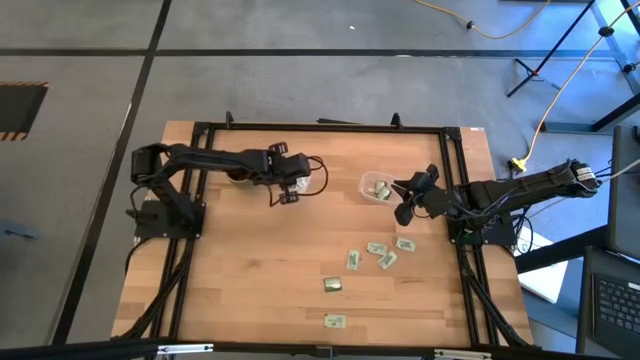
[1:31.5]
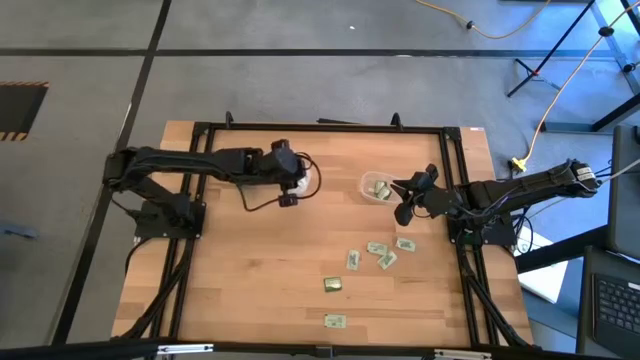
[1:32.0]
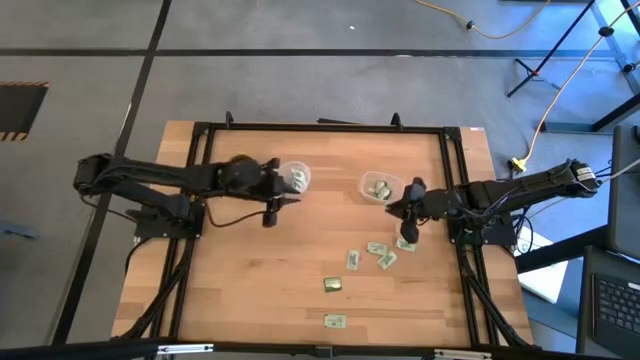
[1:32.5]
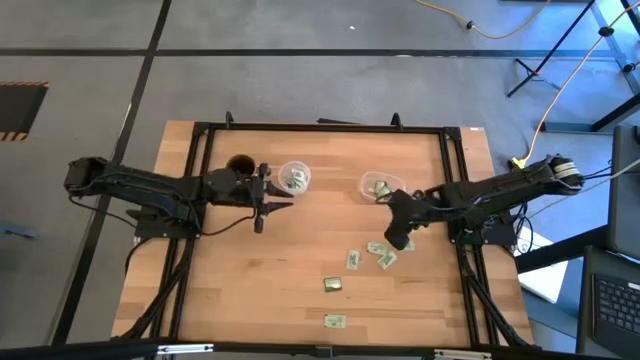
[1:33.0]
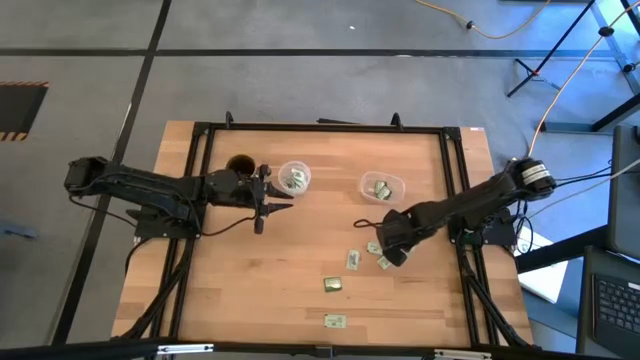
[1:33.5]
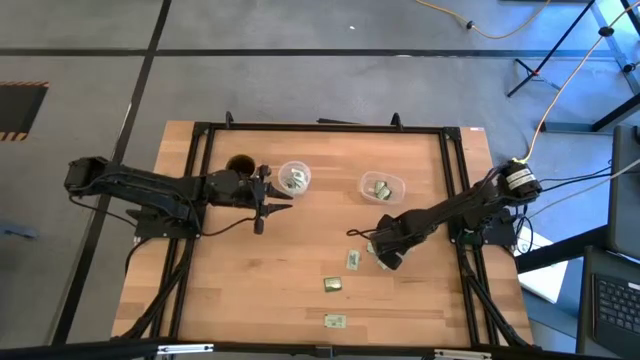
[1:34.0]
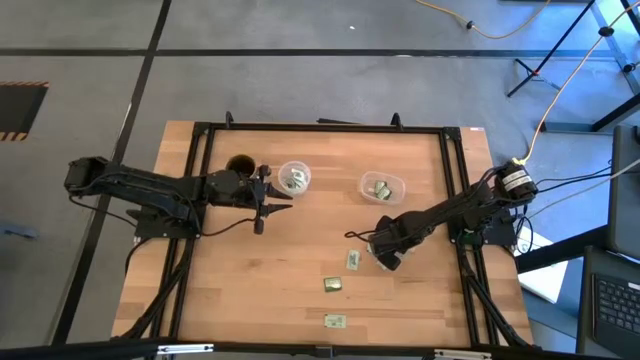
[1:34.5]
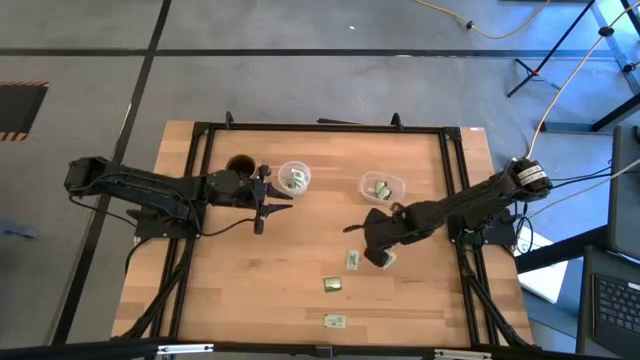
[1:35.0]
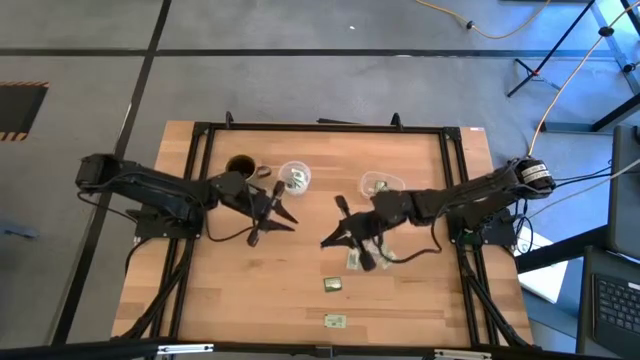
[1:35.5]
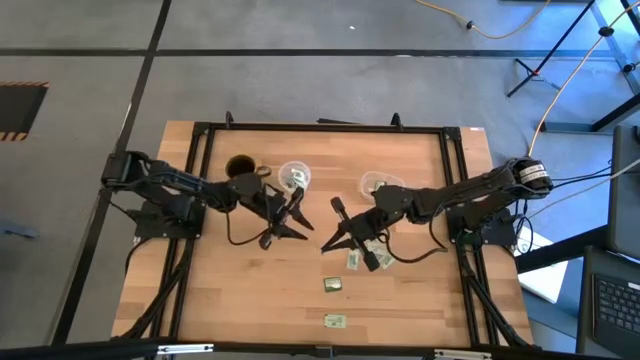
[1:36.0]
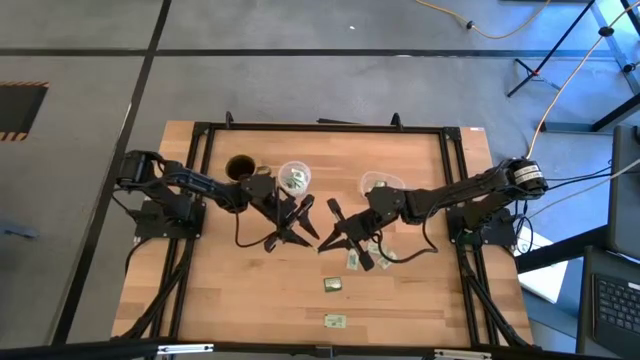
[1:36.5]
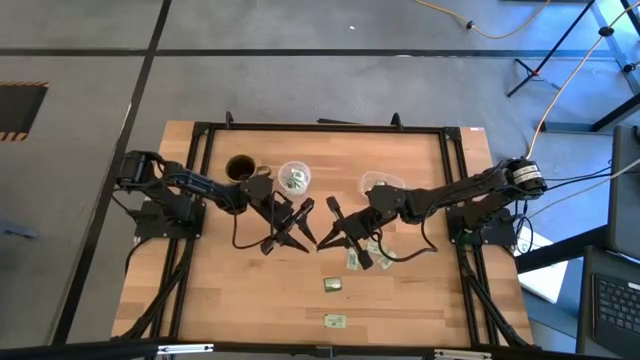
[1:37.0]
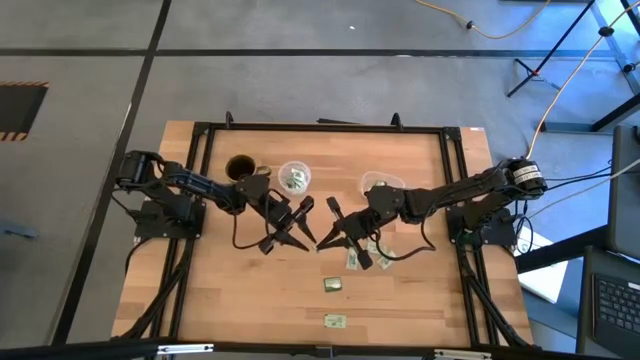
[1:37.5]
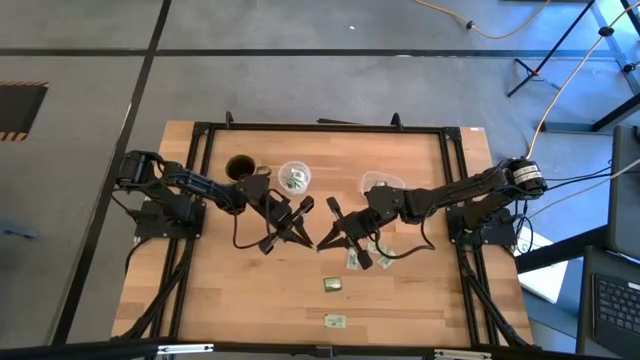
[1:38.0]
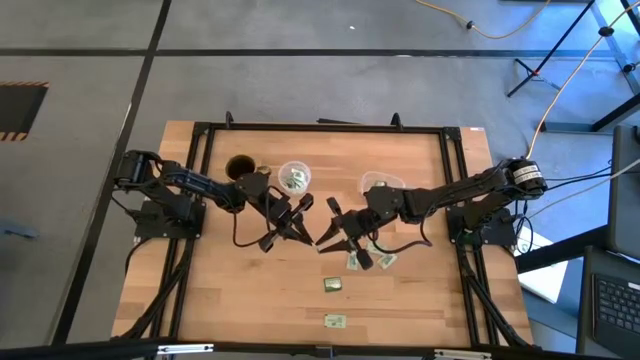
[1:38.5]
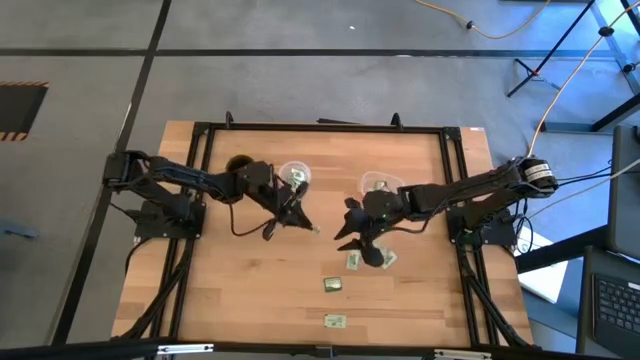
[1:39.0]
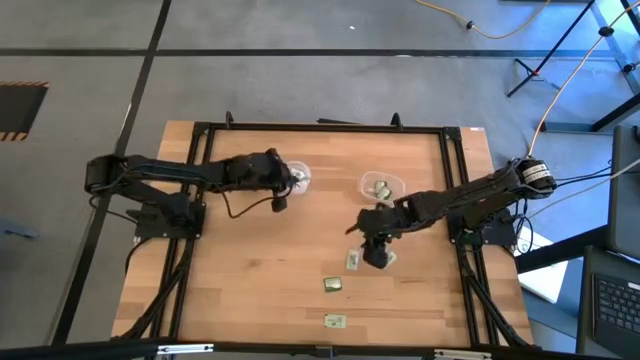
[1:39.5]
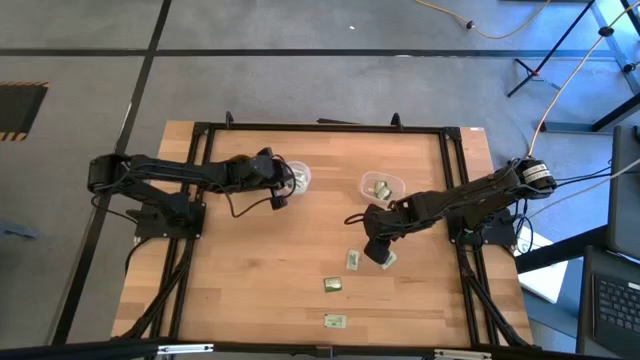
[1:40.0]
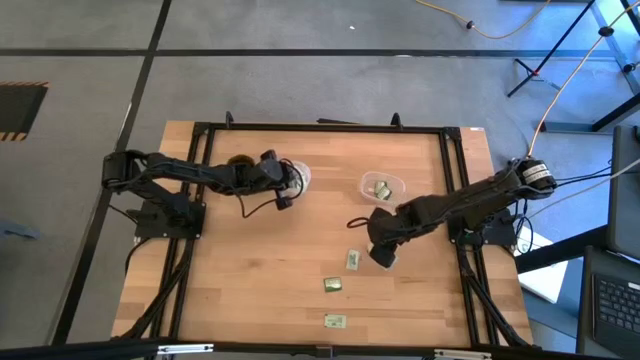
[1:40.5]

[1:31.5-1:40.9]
Task: Pick and place items into bin
Put the white stevia packet into the left transparent bin

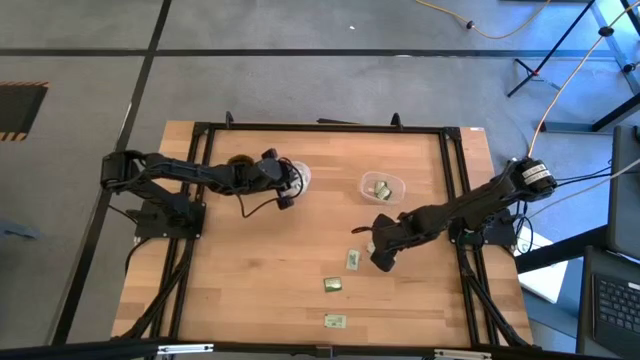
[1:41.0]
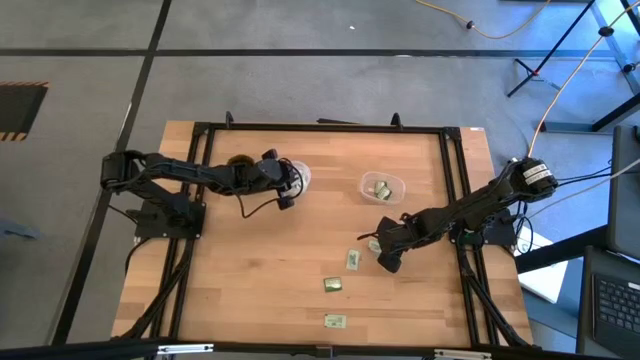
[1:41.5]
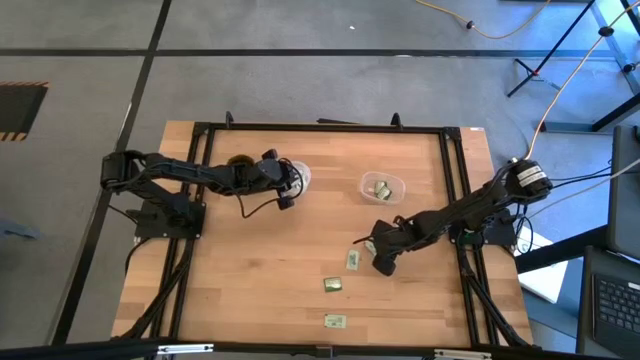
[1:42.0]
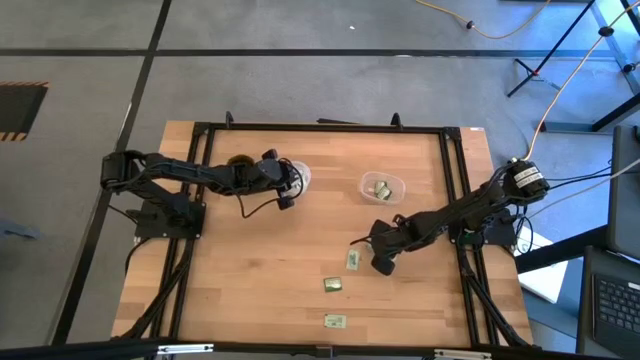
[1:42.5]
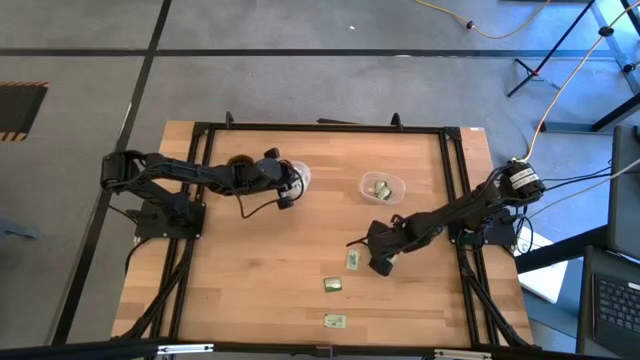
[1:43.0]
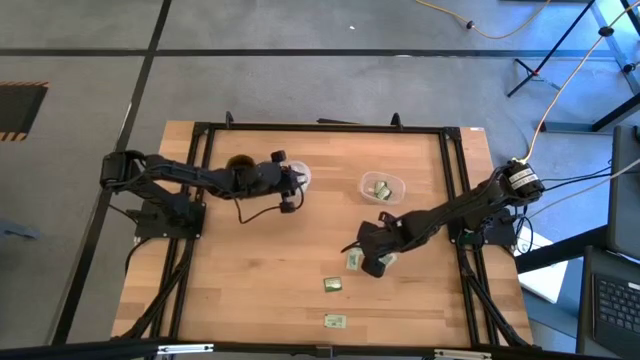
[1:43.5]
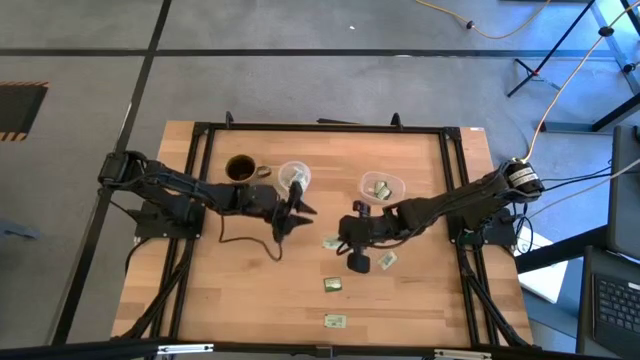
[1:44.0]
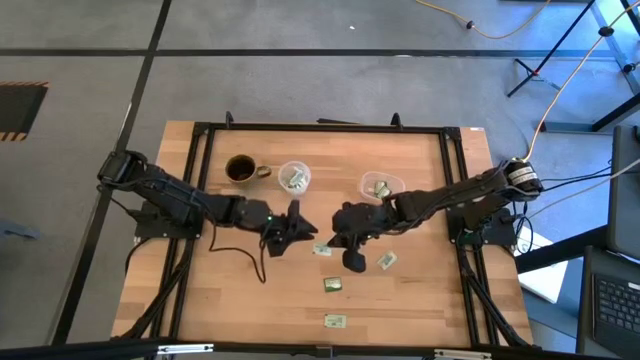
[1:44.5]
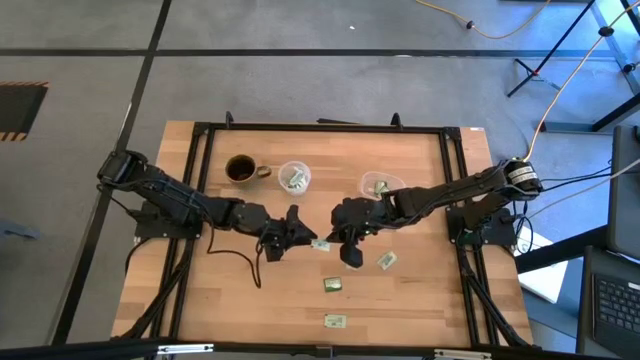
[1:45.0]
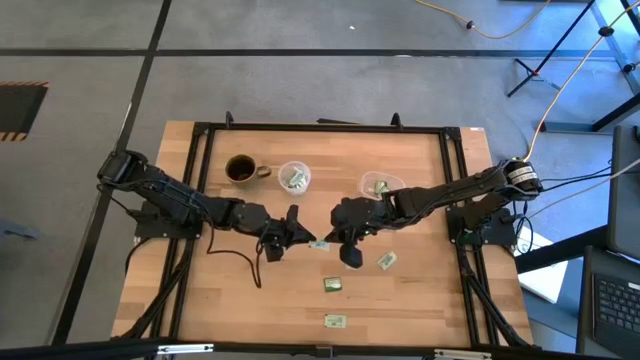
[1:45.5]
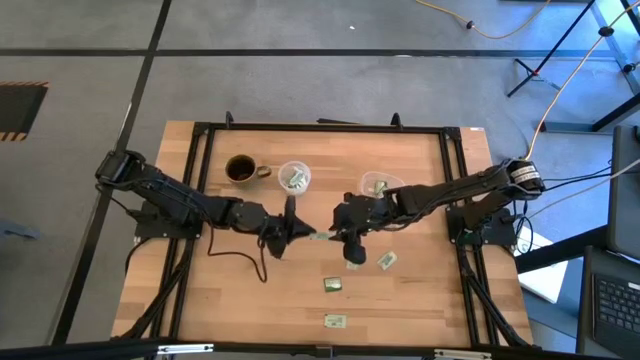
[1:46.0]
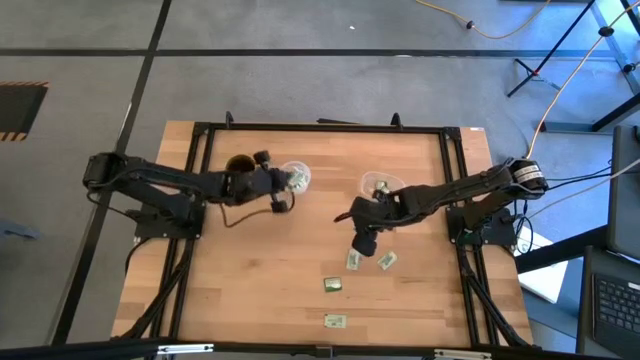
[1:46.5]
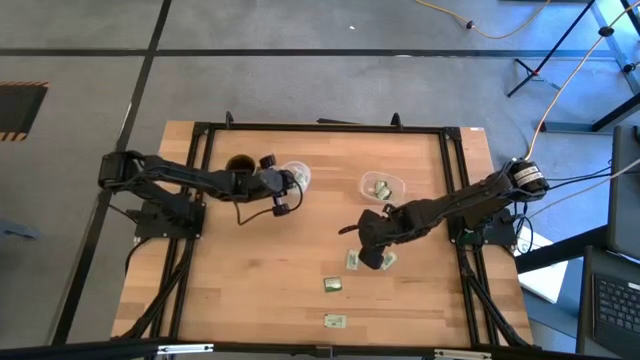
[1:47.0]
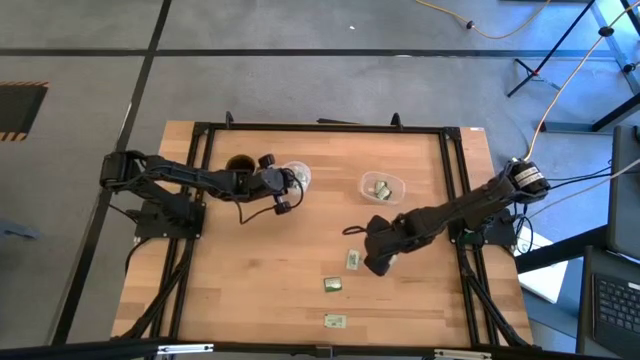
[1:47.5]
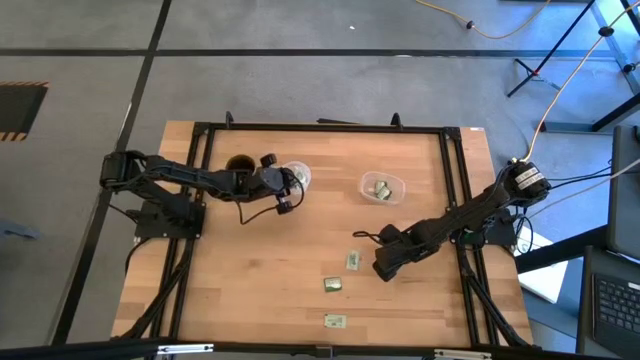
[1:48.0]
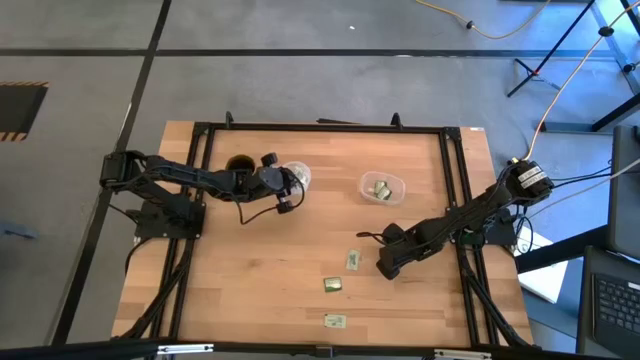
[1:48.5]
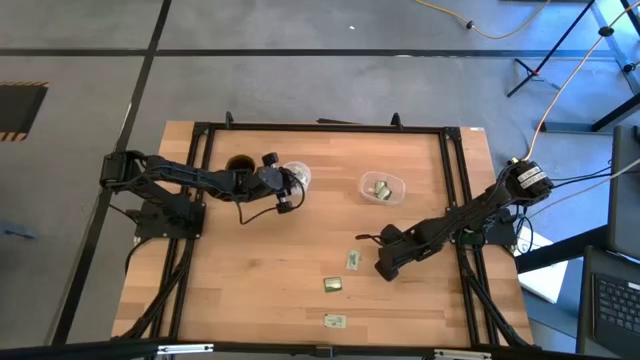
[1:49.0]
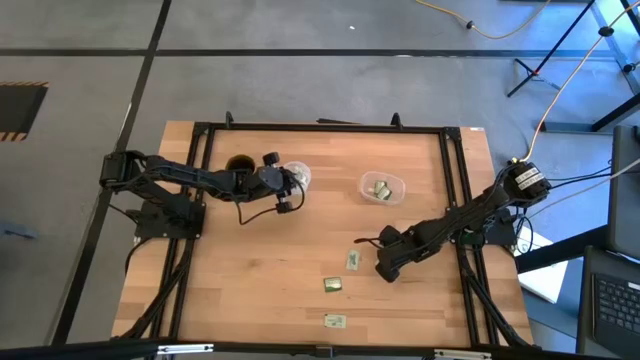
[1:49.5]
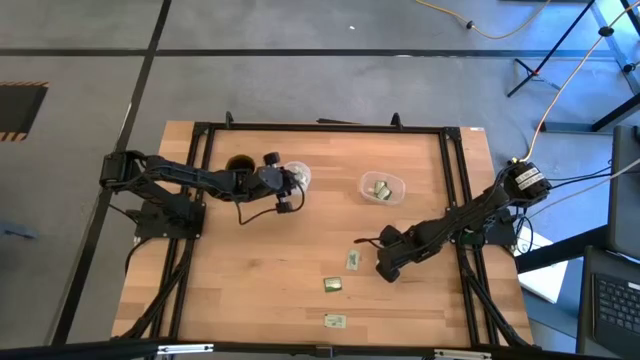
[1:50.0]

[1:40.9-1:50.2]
Put the white stevia packet into the left transparent bin

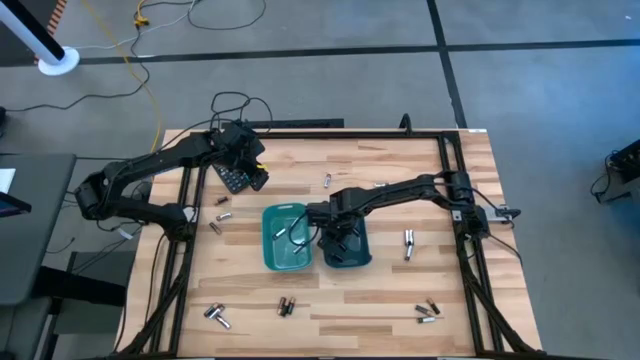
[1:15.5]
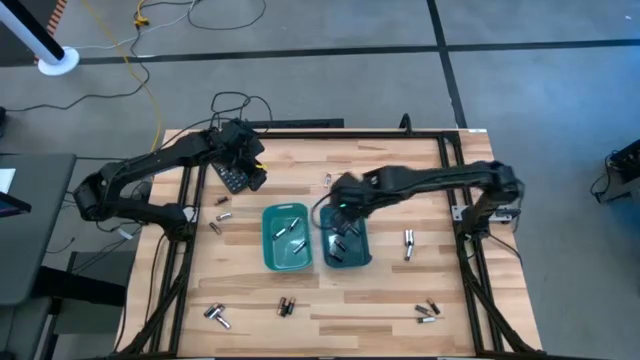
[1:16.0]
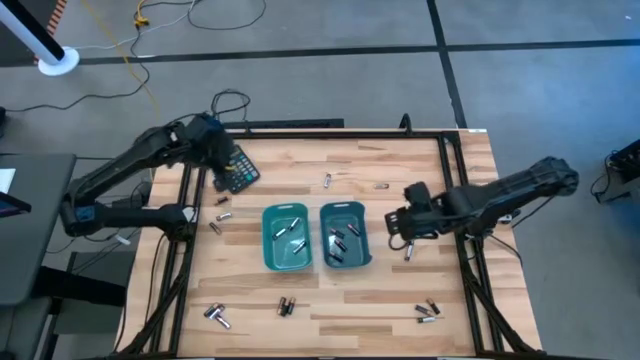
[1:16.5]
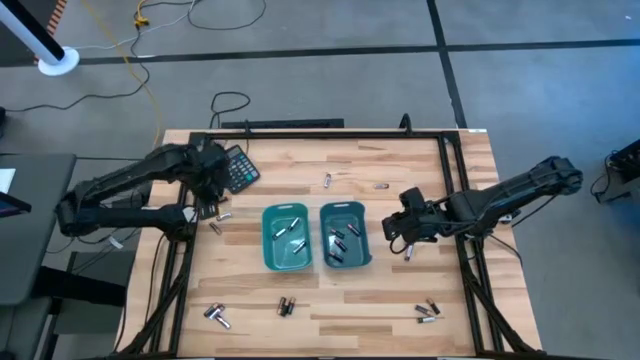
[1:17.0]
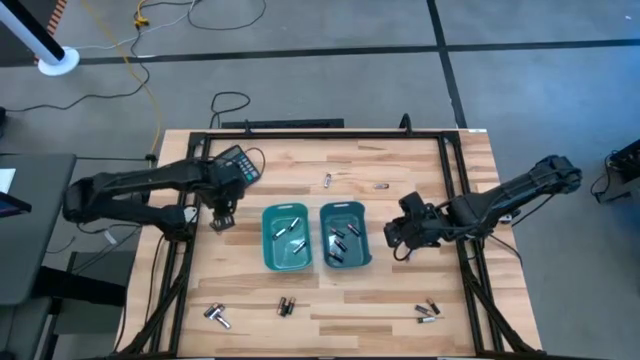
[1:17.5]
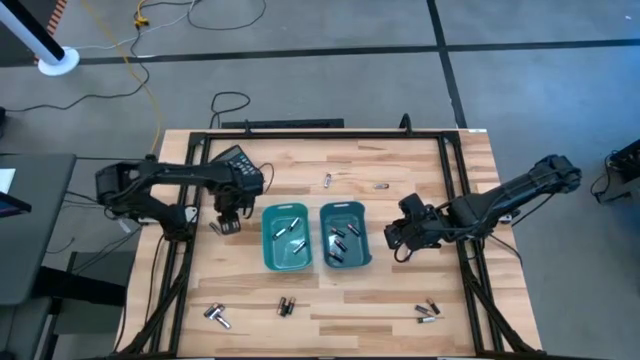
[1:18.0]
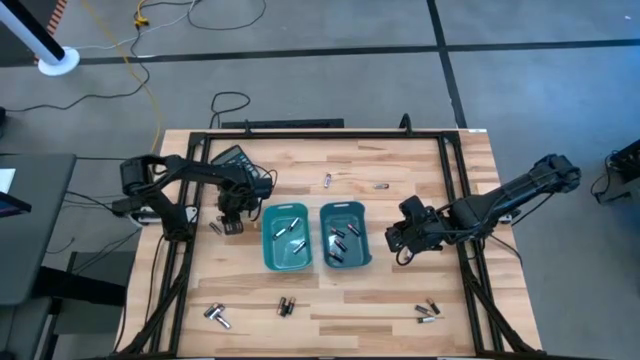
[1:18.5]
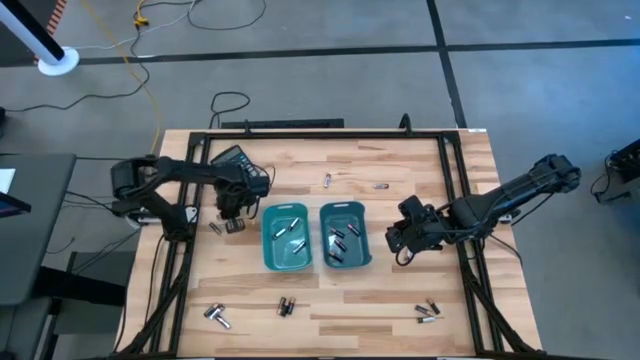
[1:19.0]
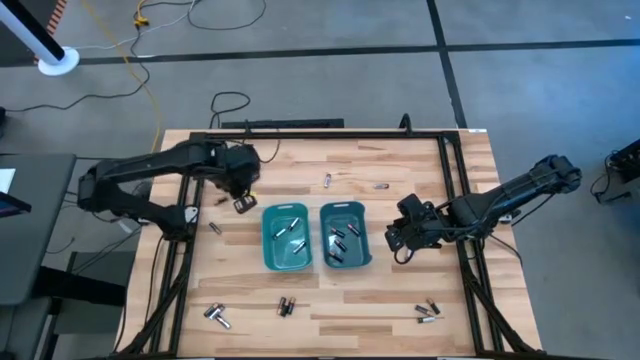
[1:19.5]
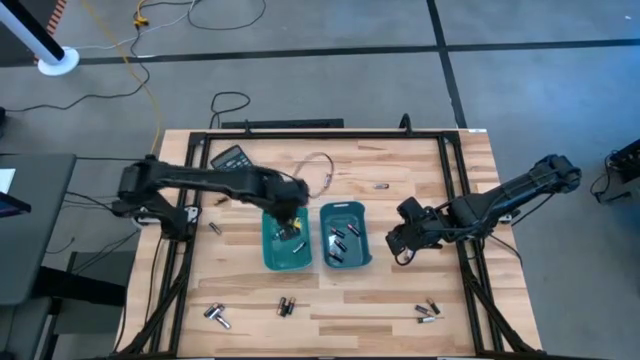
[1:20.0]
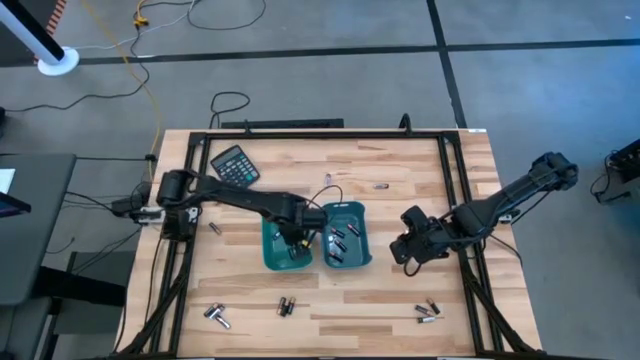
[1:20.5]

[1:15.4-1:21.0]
Task: Sort batteries
Put the silver battery into the green bin
